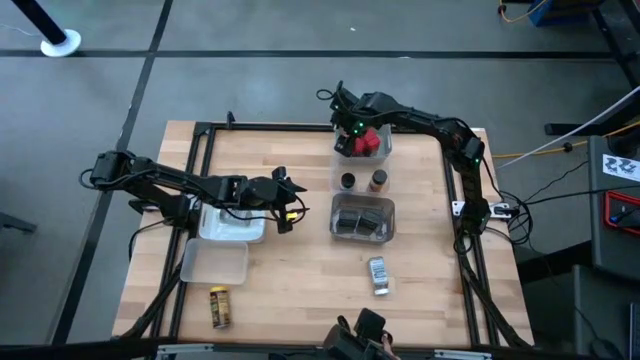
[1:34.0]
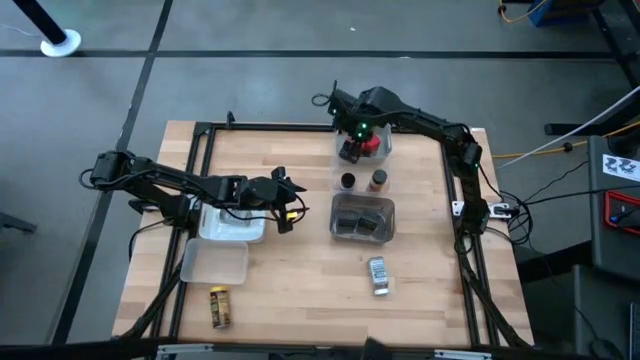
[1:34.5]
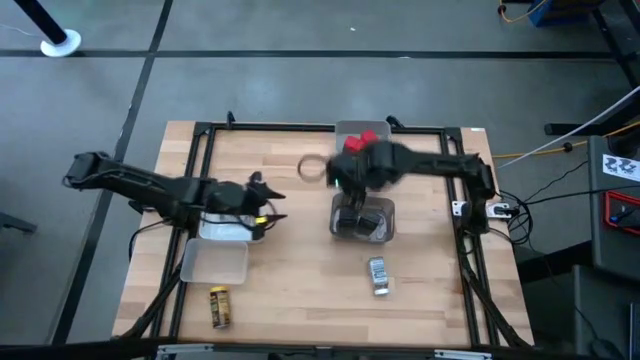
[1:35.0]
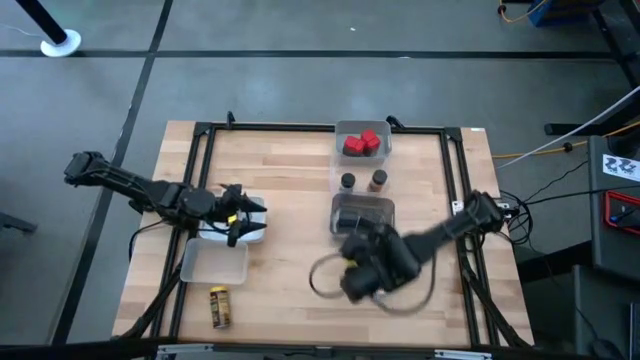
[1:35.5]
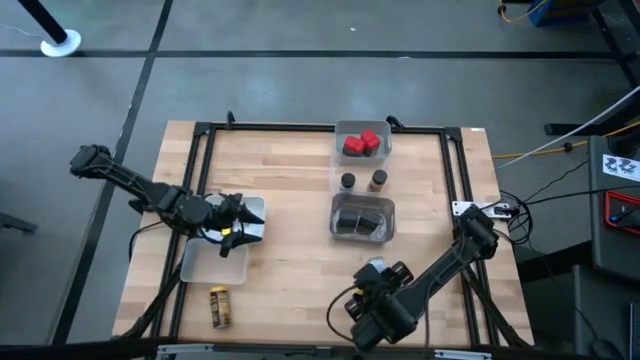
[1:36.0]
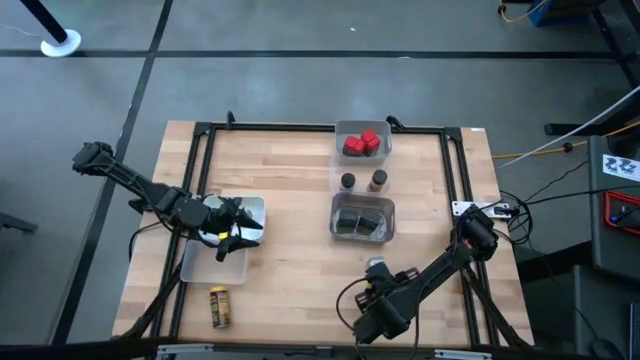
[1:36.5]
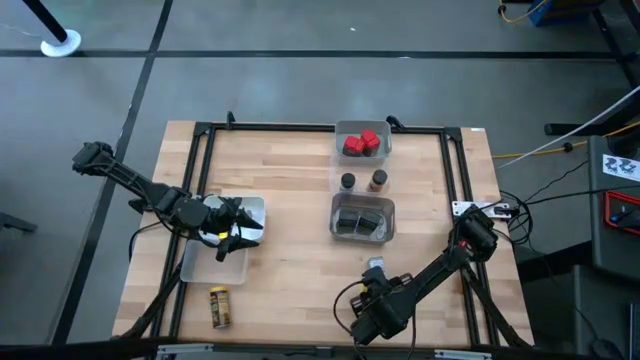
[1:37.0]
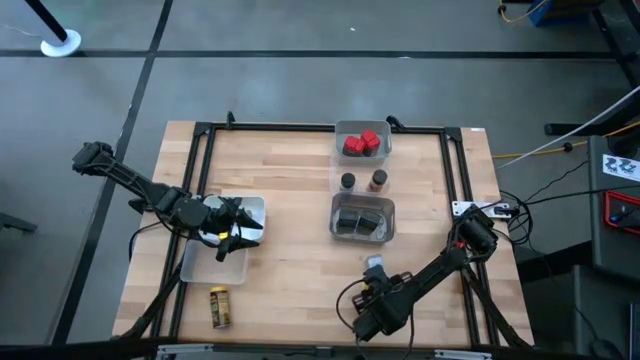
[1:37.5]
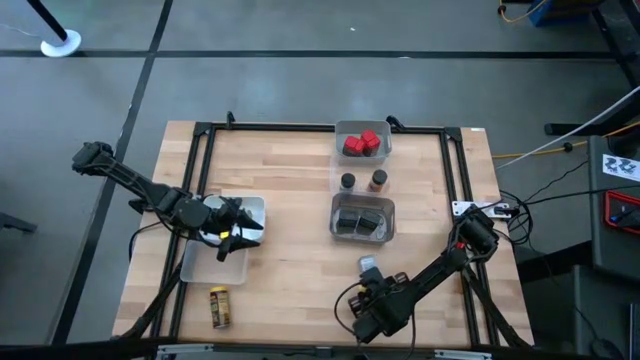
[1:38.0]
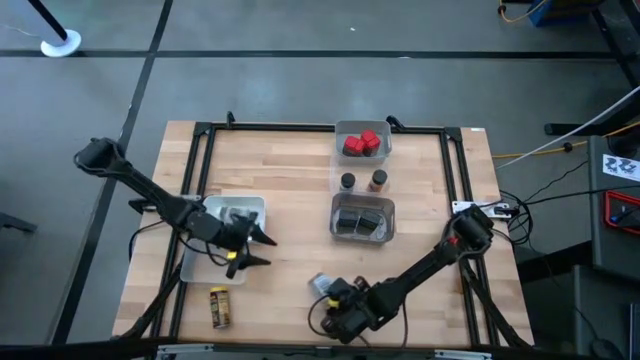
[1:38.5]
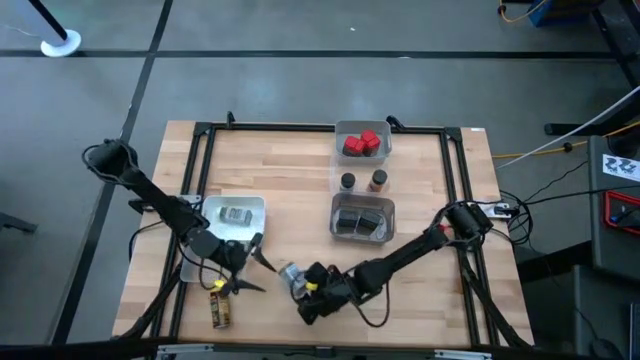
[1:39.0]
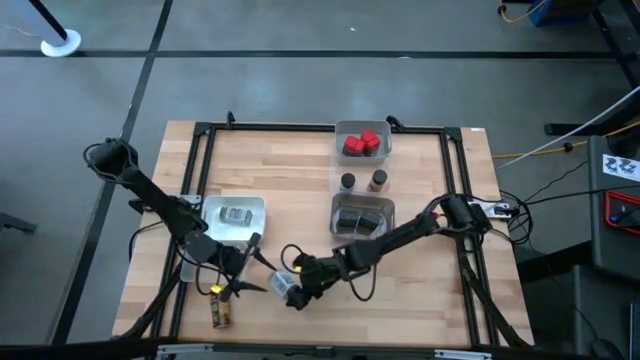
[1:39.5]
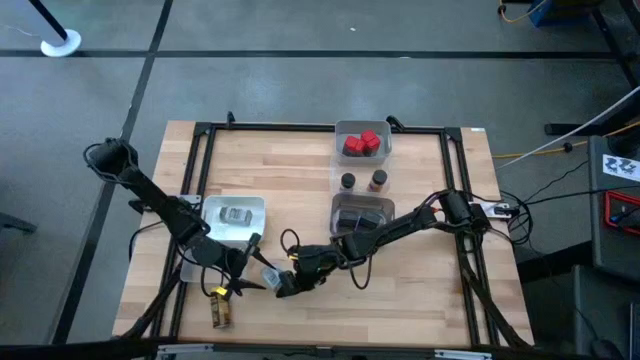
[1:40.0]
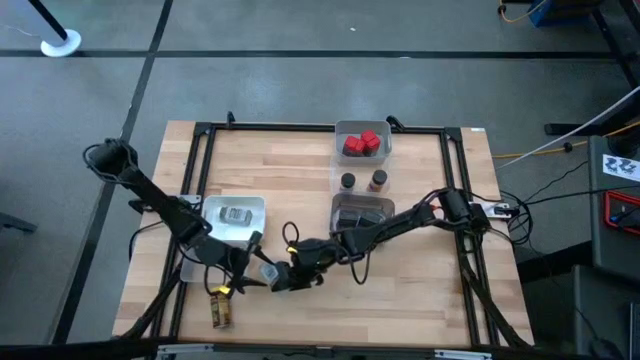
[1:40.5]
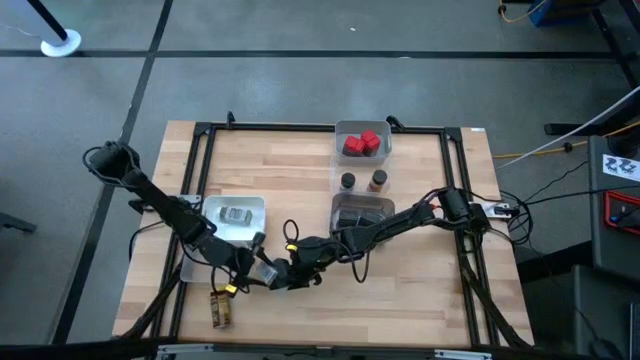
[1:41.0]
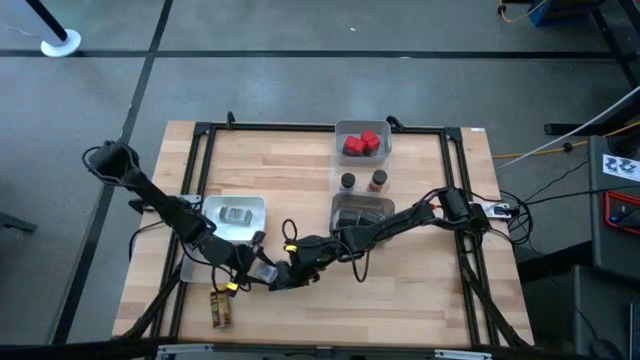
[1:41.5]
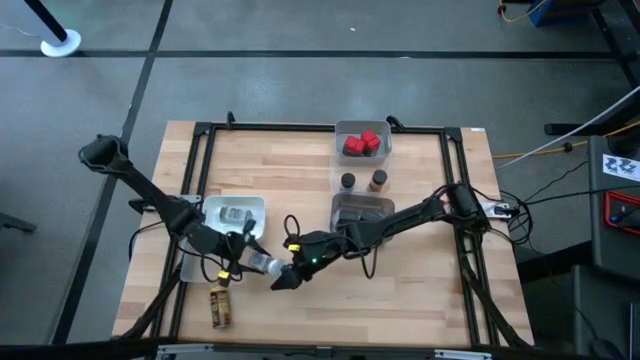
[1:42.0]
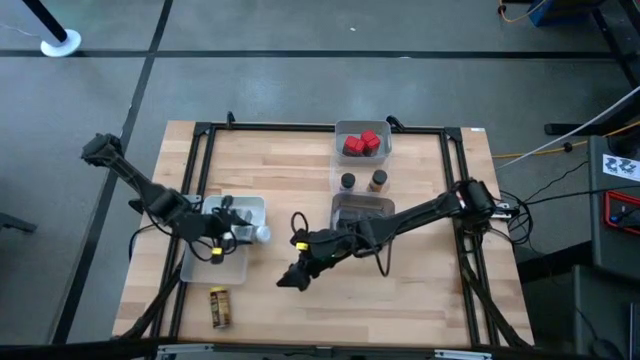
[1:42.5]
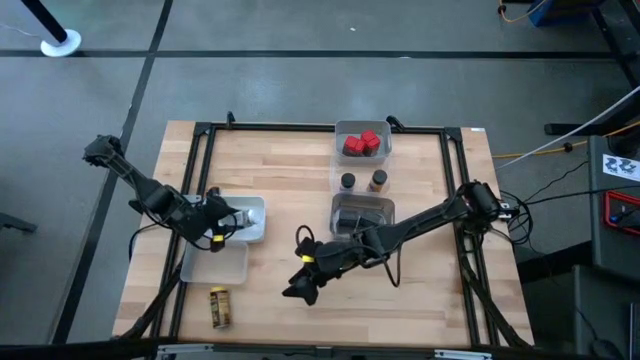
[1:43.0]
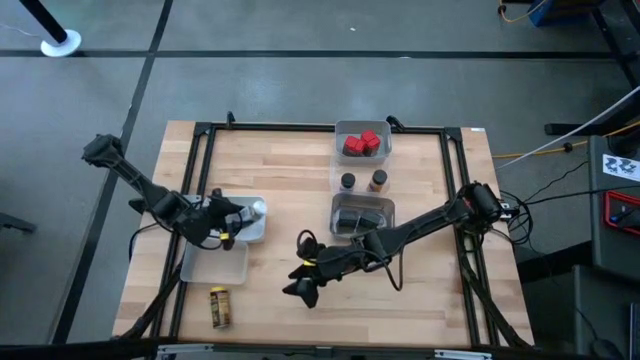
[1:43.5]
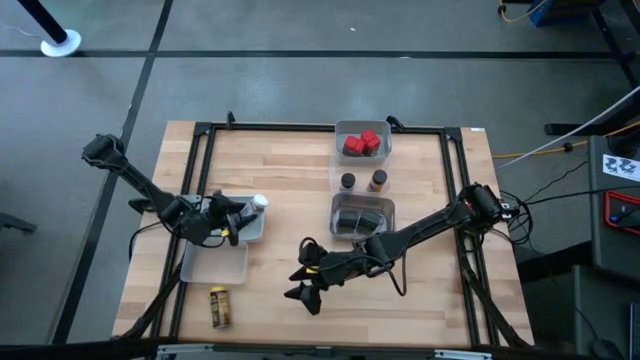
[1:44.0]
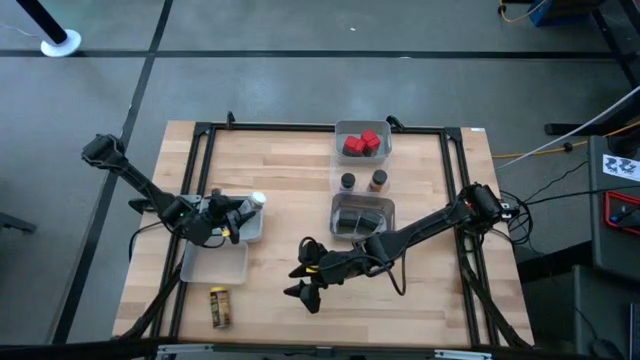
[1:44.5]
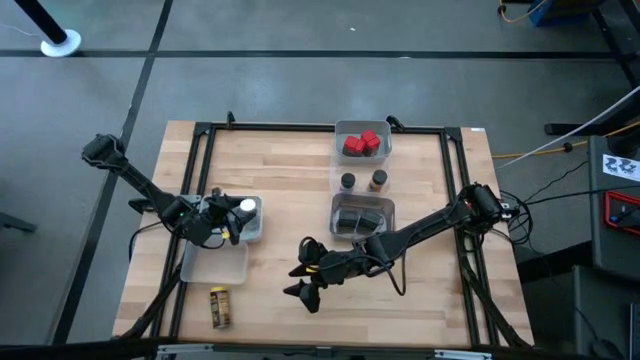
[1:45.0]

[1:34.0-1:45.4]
Task: Sort spices by type
Put the white seasoning bottle into the white bin

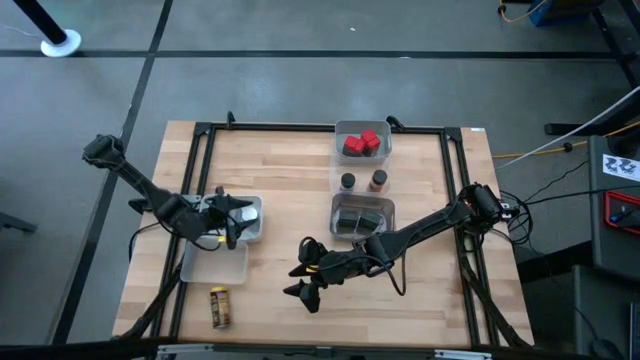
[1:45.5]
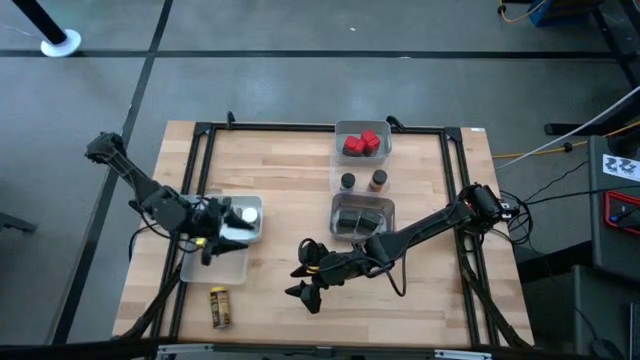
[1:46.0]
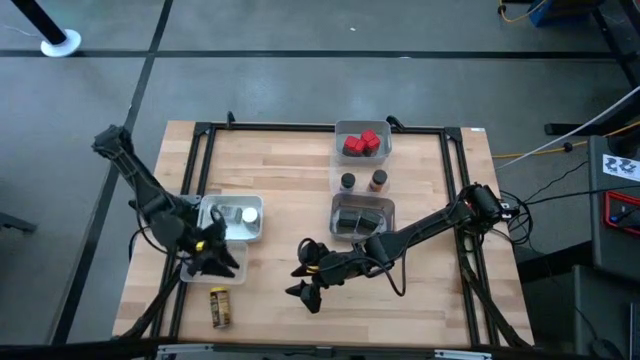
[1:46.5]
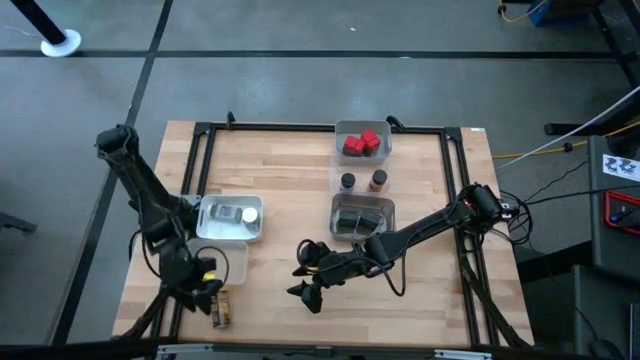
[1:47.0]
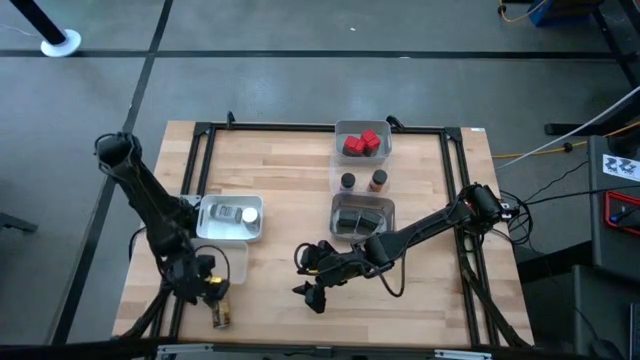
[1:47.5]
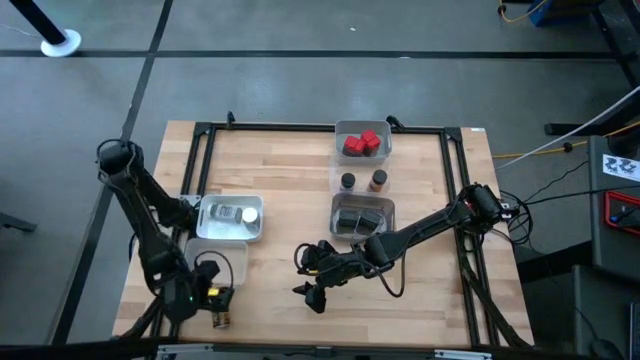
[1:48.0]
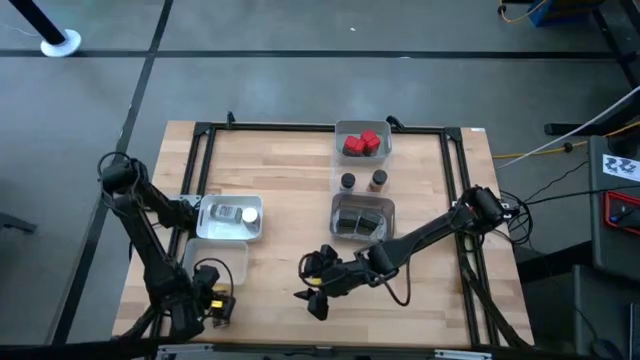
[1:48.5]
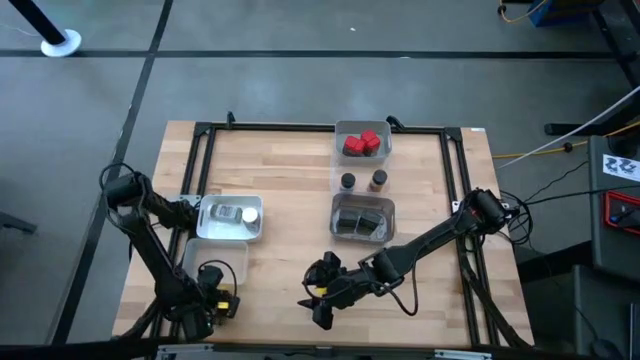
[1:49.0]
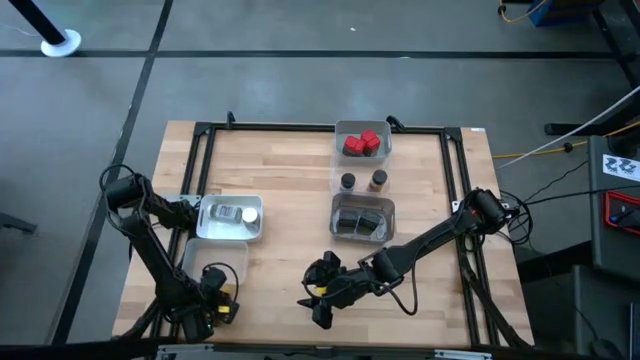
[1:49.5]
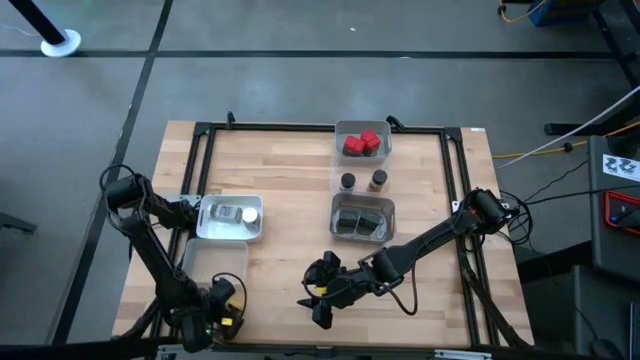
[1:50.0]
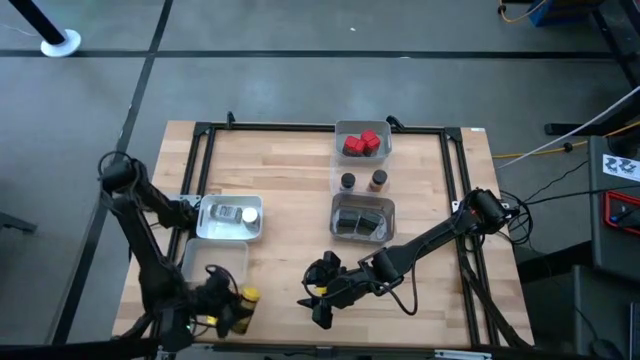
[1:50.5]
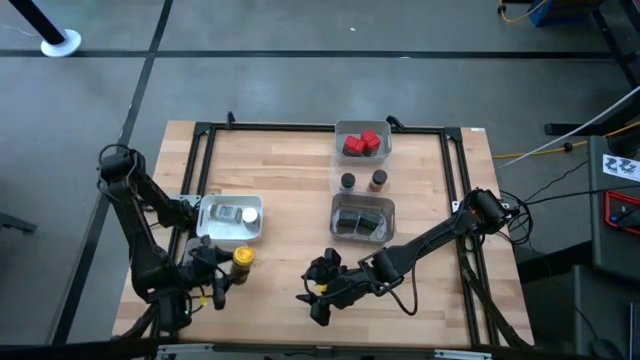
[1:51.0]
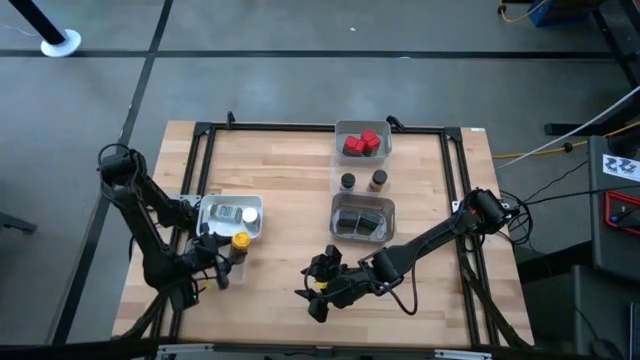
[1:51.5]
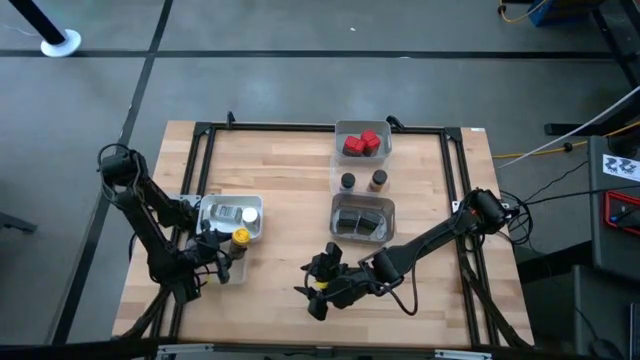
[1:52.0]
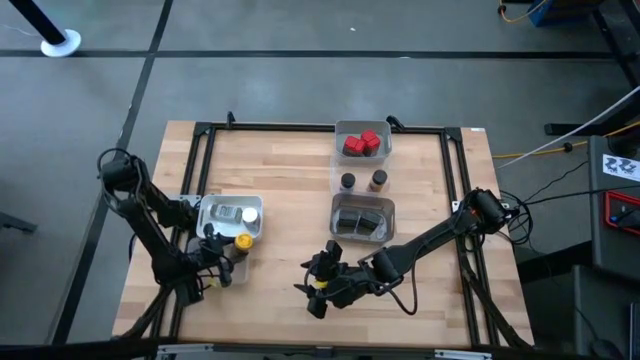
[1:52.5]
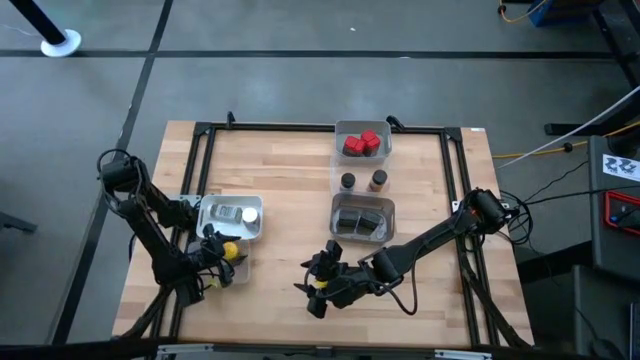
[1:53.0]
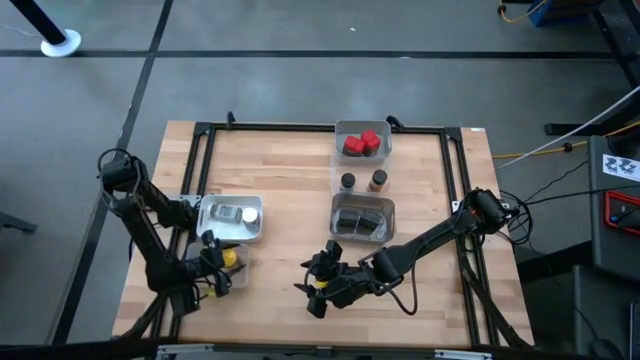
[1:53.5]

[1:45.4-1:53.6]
Put the yellow seasoning bottle into the bottom transparent bin
